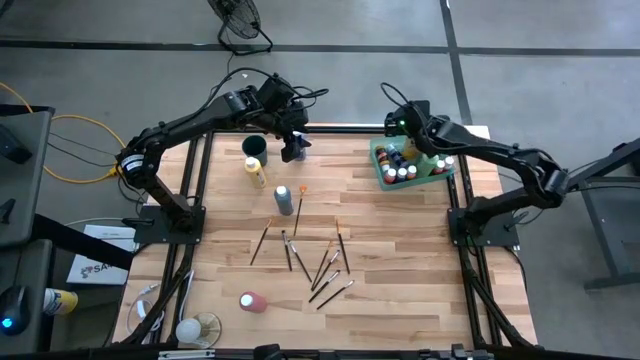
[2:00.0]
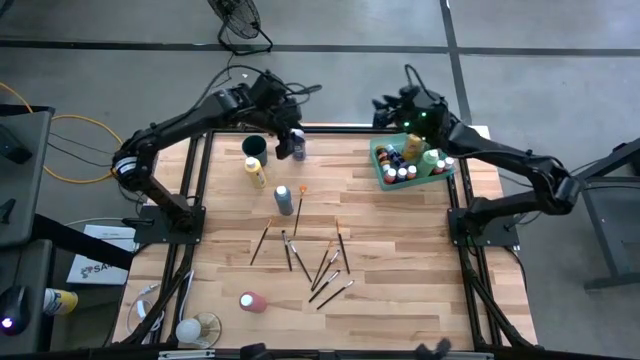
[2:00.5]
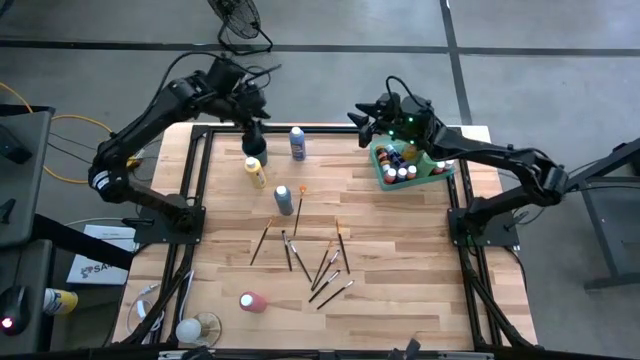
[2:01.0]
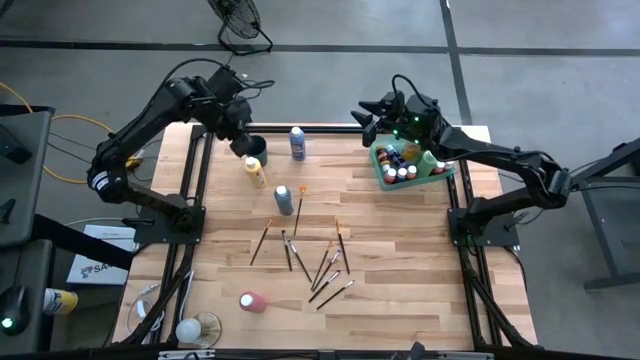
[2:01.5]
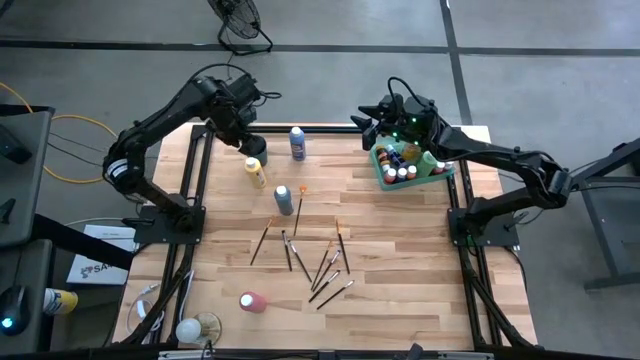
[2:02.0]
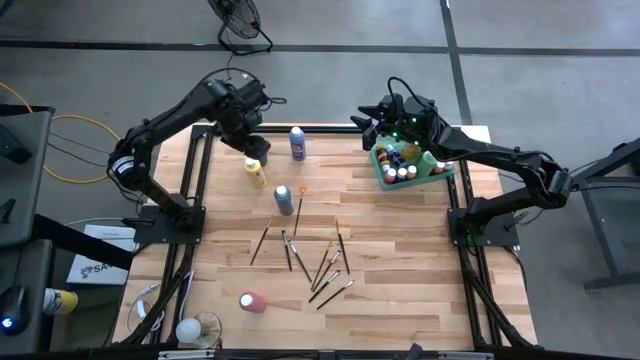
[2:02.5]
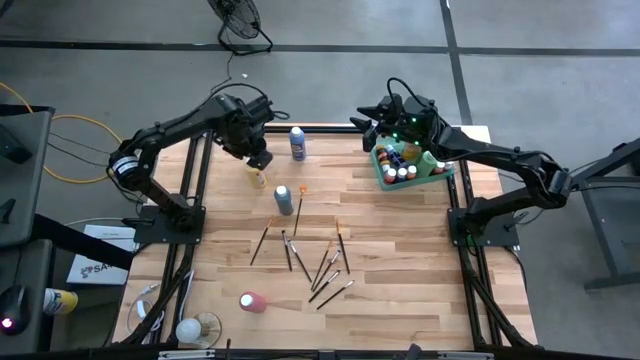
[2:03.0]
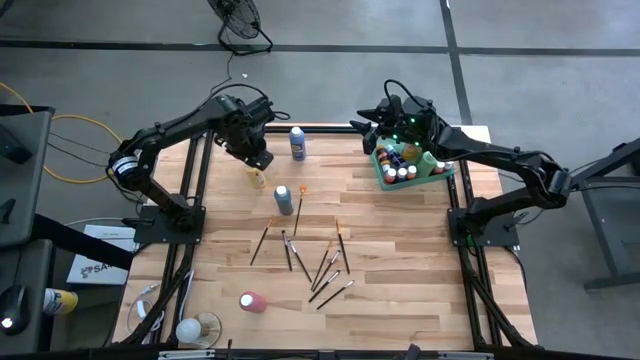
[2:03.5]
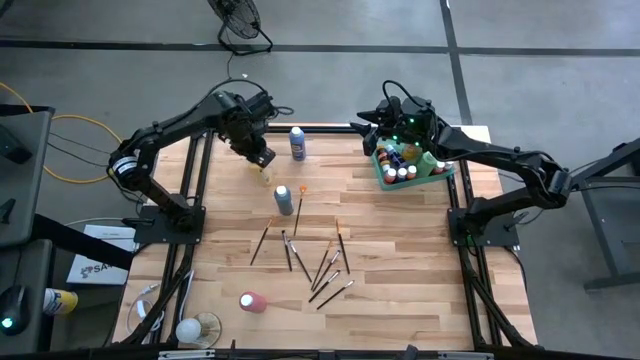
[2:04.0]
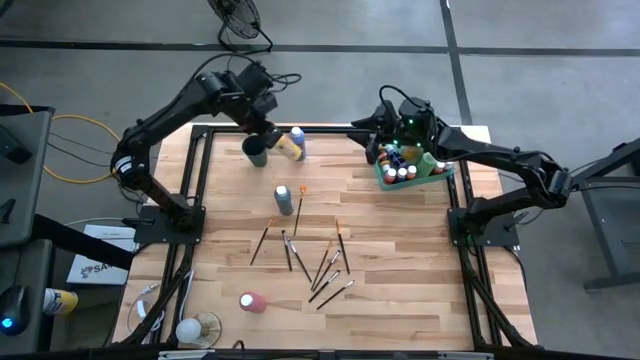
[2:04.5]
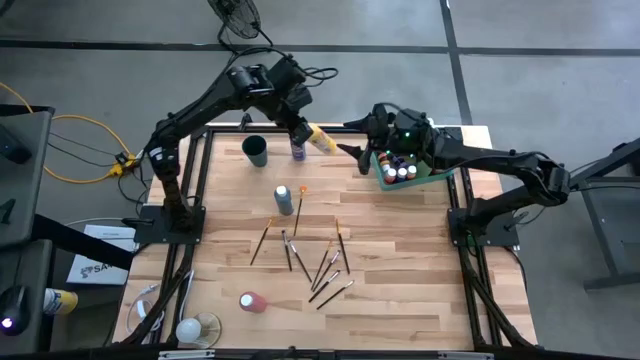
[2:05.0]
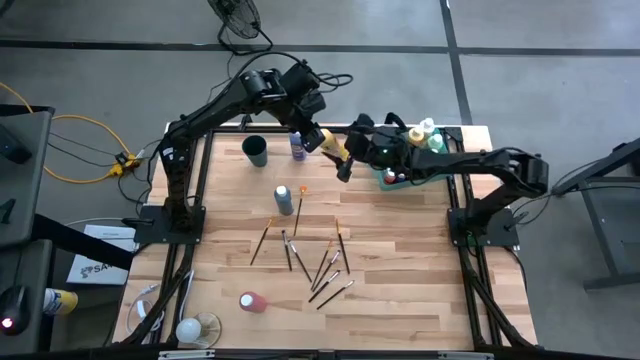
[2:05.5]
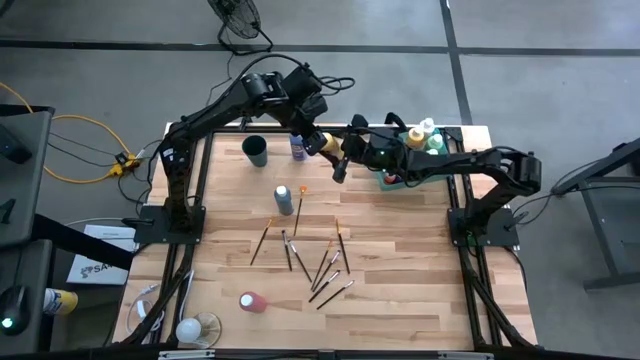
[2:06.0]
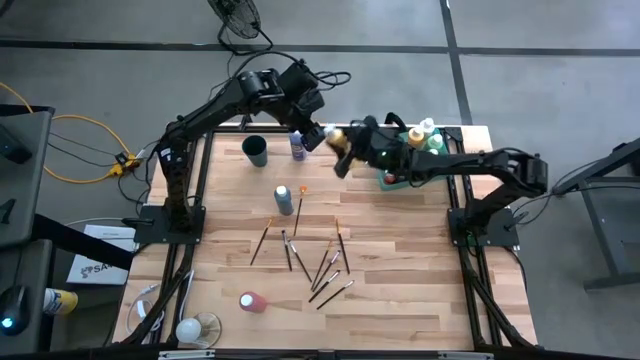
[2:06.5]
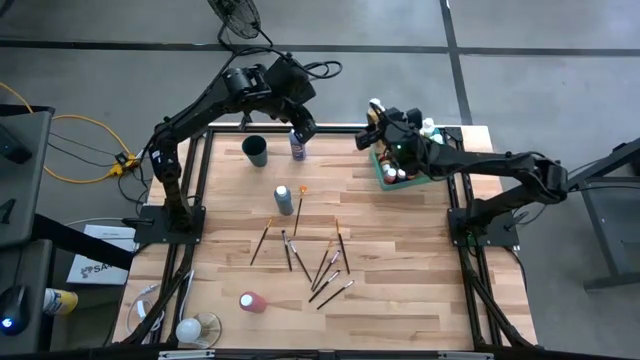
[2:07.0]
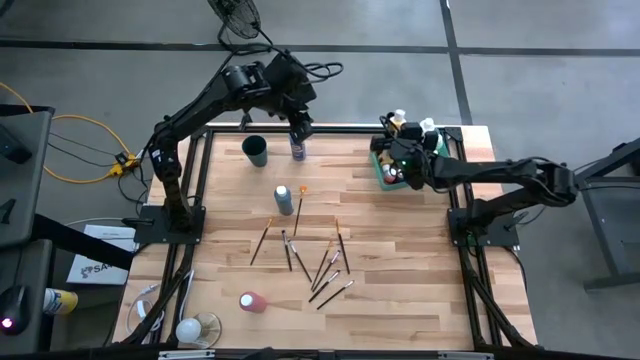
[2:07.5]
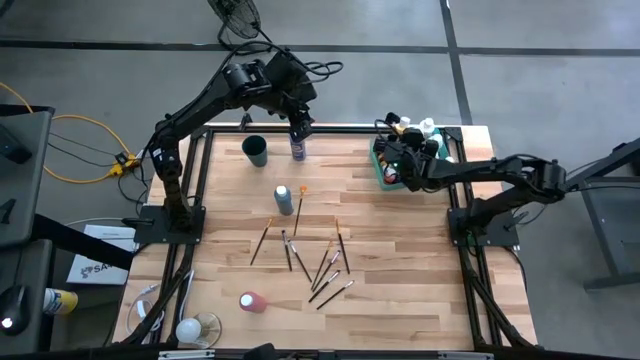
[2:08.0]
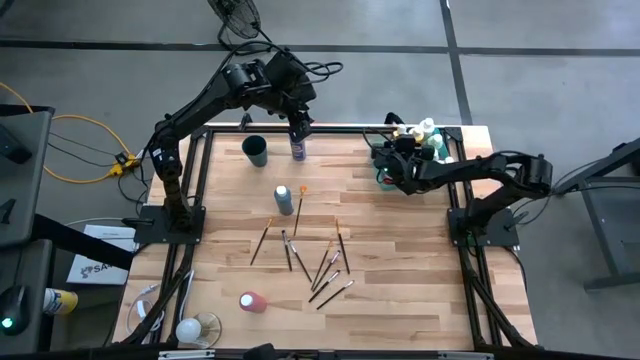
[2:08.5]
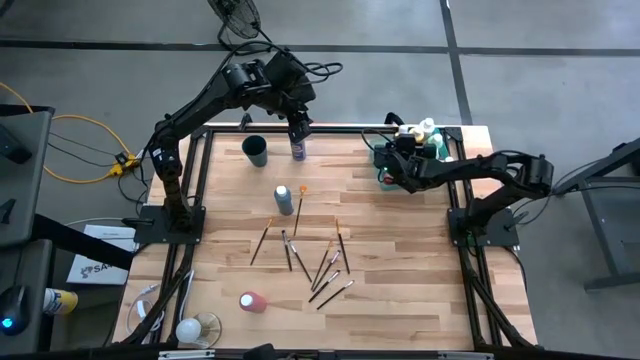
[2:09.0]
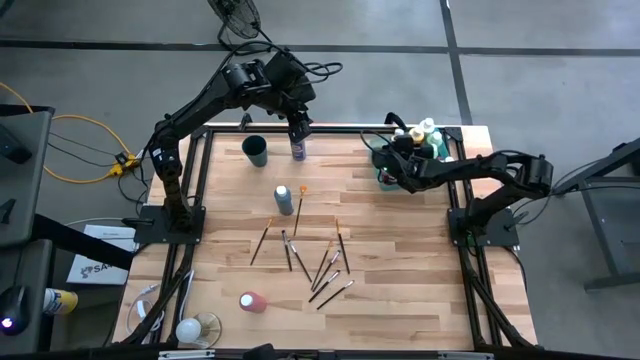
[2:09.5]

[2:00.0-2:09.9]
Task: Pick & Place Paint Supplies
Put the big yellow paint bottle into the green bin

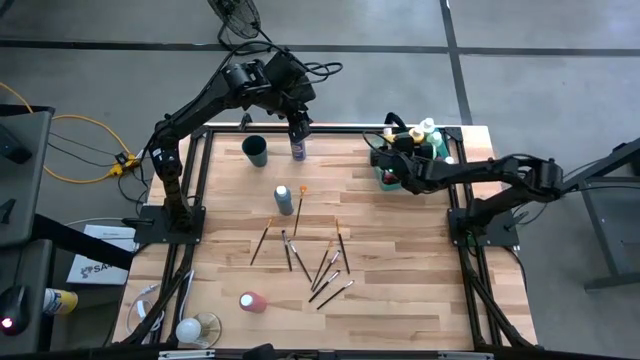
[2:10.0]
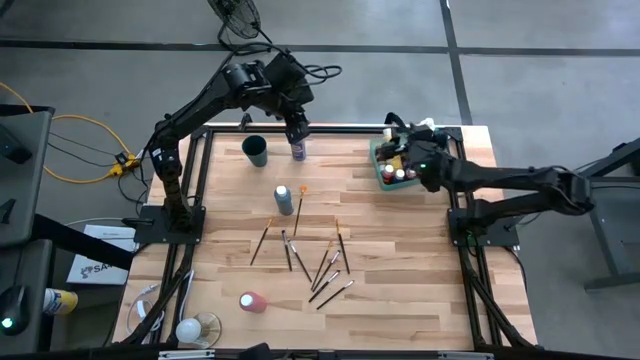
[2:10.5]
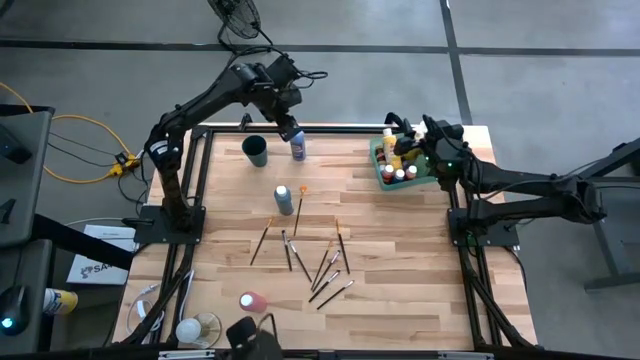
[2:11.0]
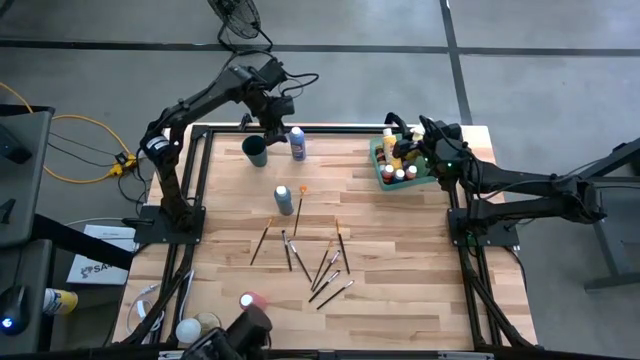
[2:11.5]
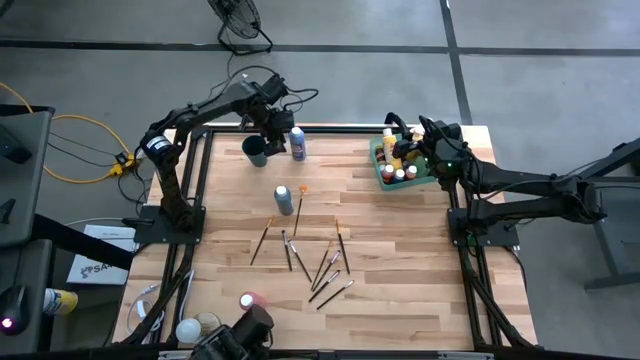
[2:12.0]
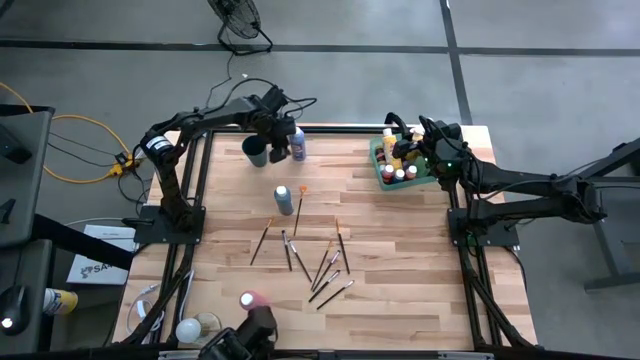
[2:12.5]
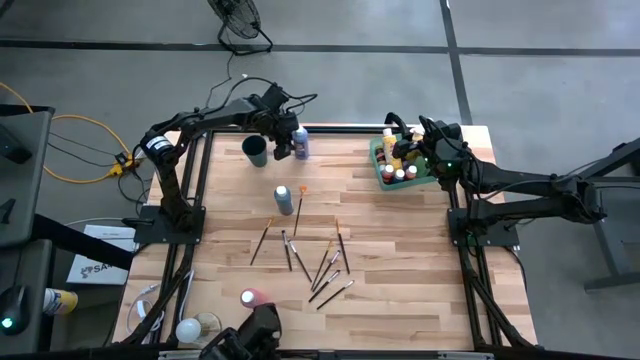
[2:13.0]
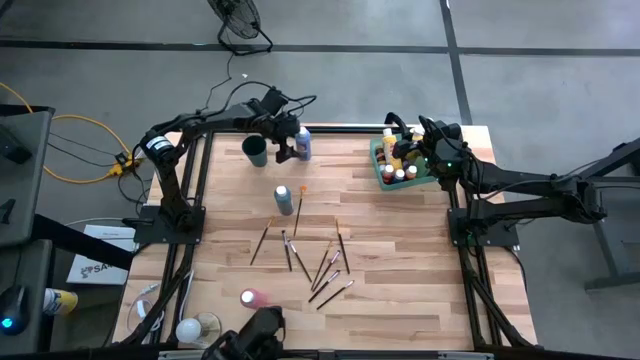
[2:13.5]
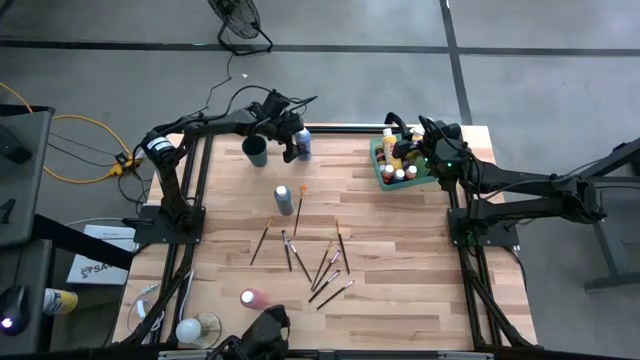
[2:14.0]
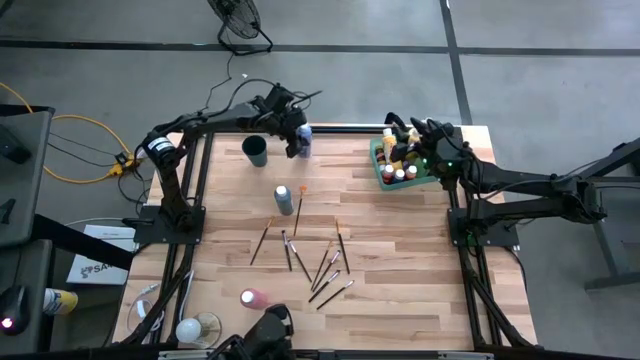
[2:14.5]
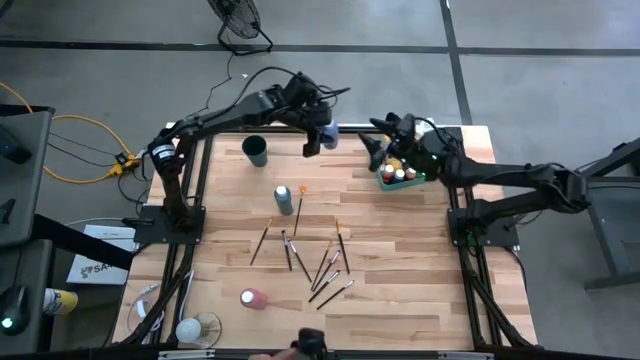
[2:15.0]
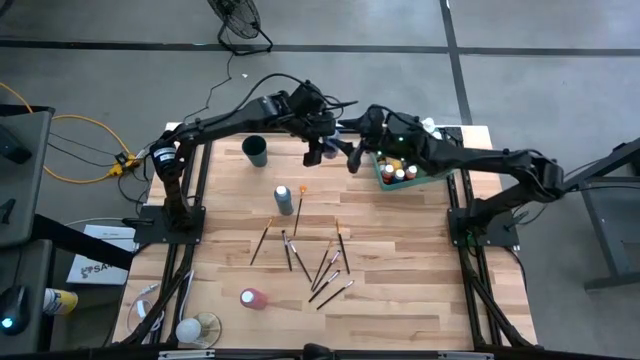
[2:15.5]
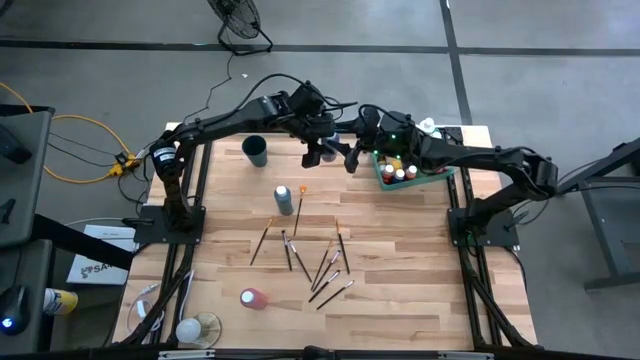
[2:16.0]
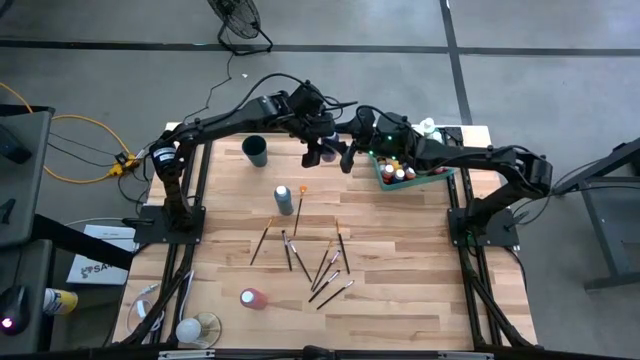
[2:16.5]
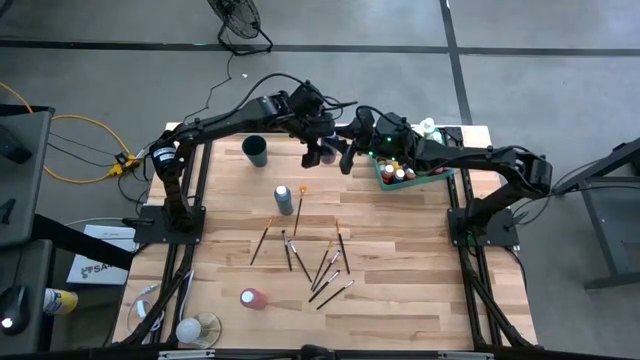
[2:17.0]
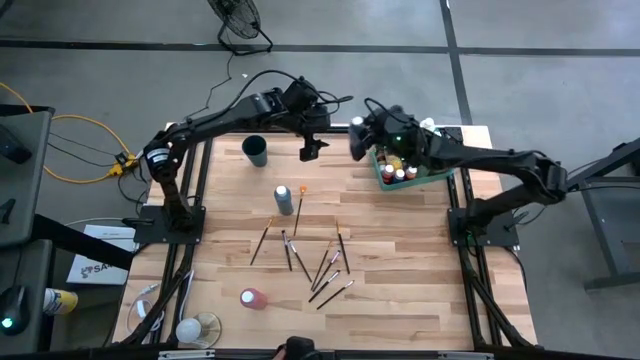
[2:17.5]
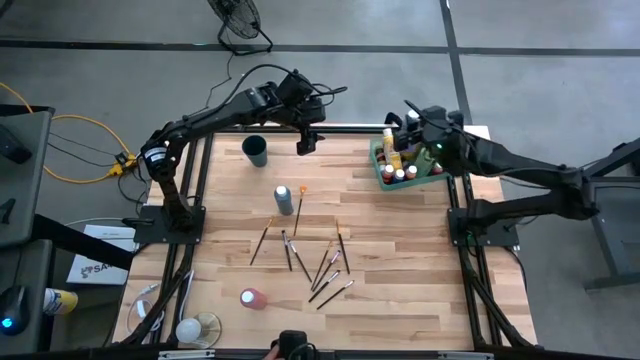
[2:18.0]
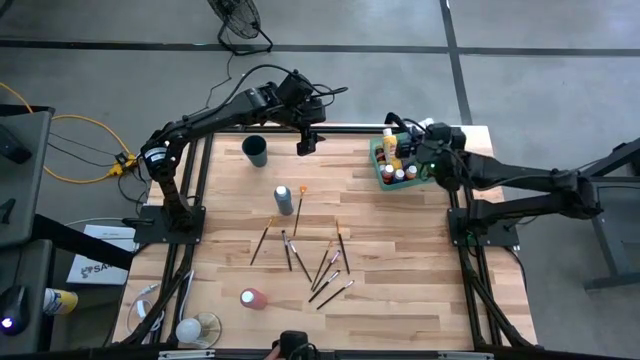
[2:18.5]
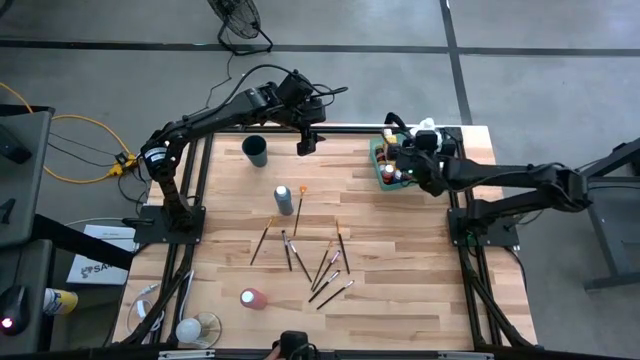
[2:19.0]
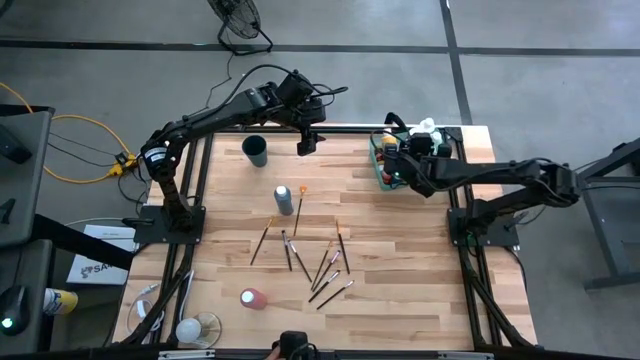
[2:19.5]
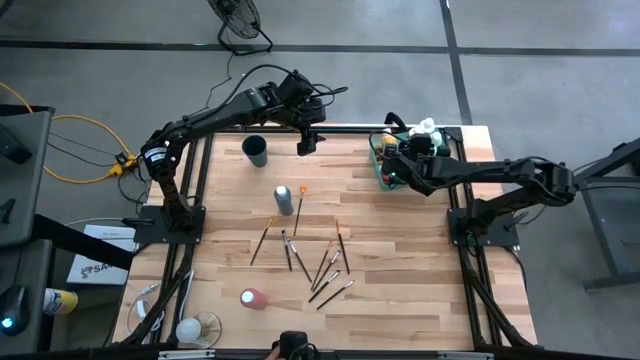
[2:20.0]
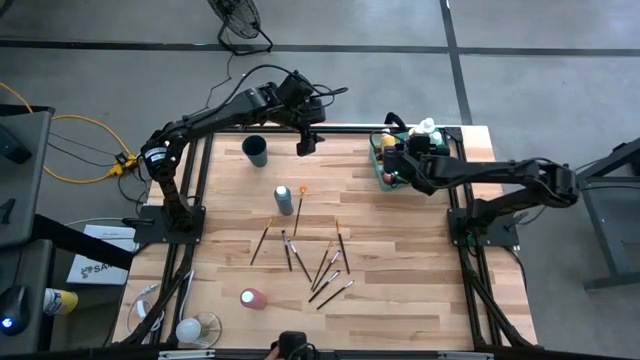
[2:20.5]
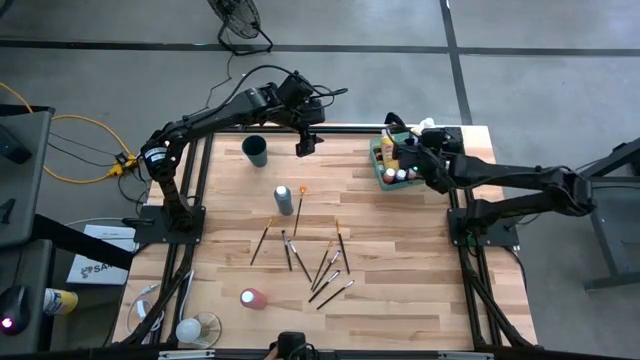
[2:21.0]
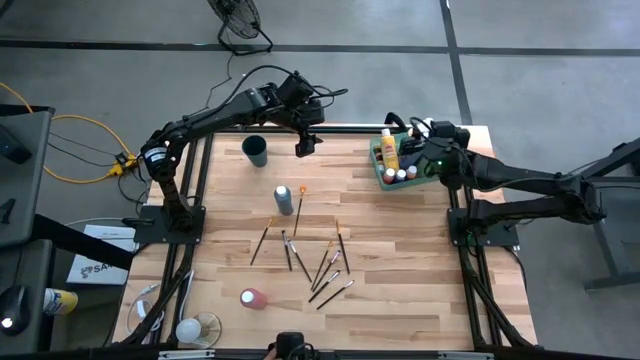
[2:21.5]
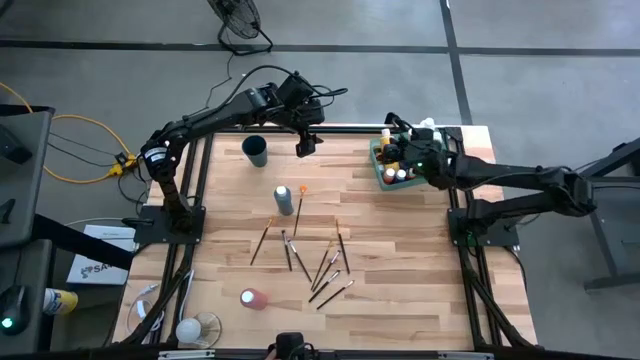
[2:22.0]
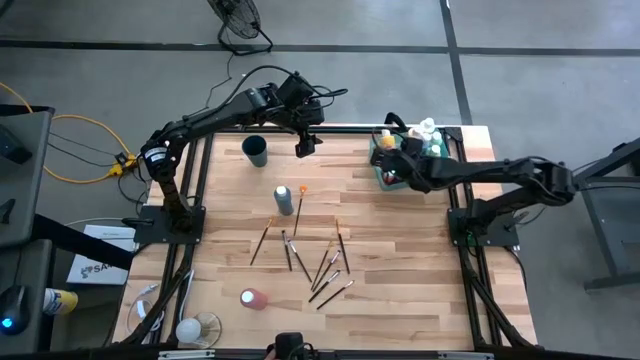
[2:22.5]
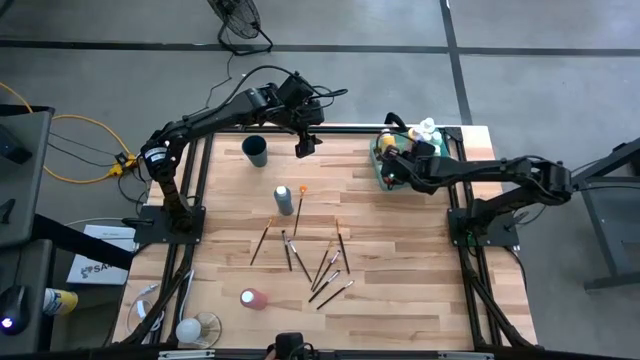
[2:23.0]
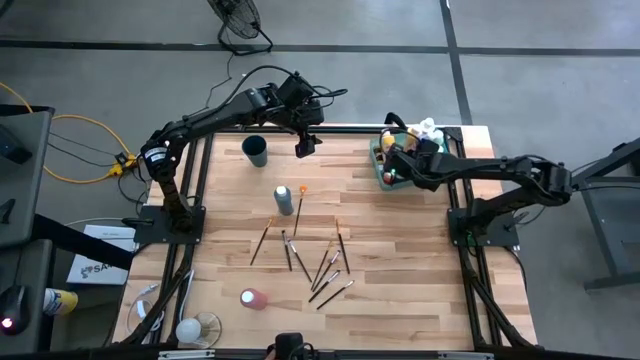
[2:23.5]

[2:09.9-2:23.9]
Put the big purple paint bottle into the green bin
